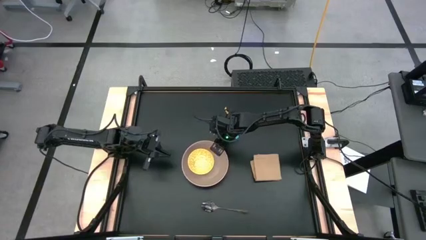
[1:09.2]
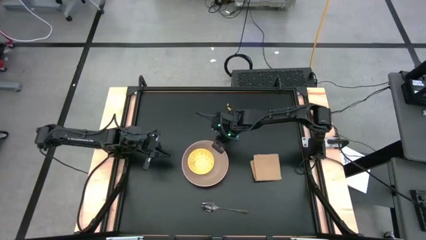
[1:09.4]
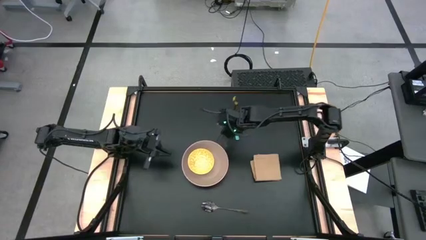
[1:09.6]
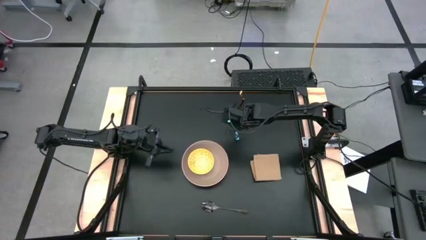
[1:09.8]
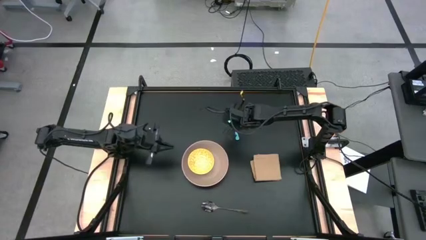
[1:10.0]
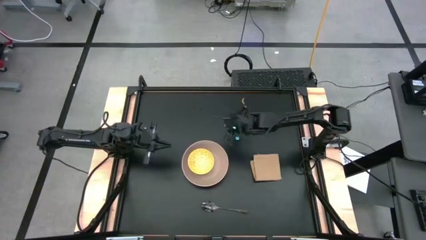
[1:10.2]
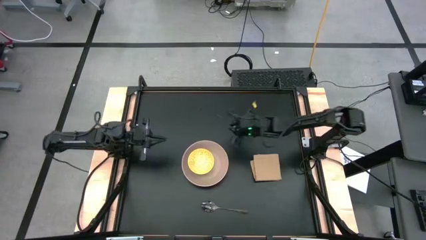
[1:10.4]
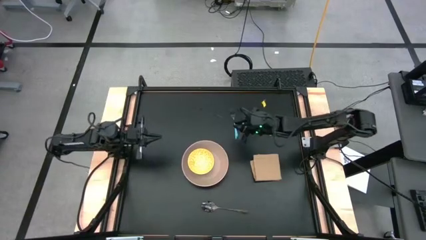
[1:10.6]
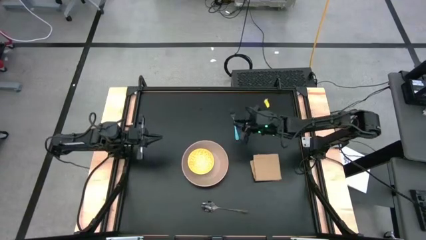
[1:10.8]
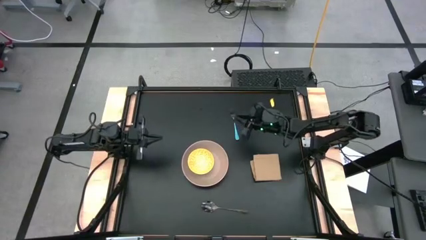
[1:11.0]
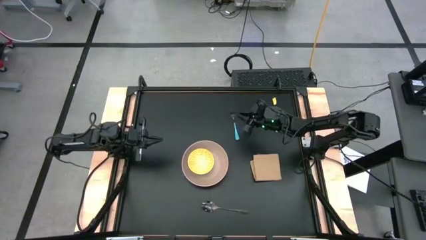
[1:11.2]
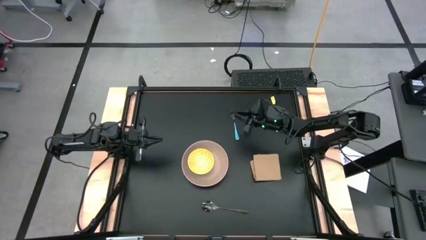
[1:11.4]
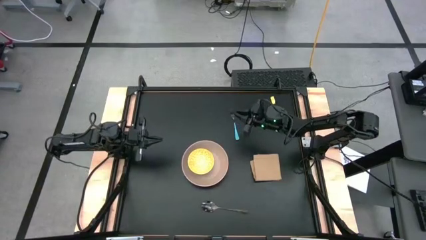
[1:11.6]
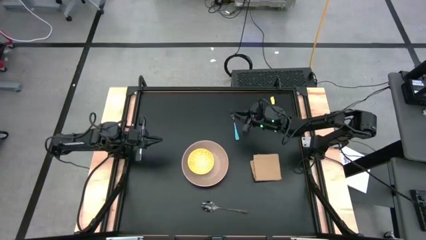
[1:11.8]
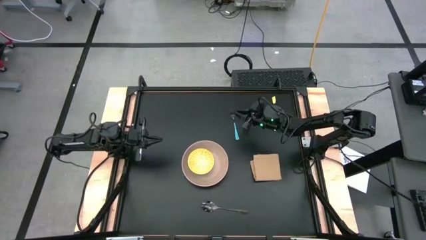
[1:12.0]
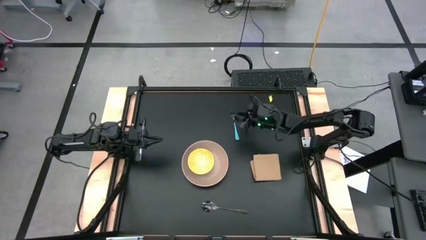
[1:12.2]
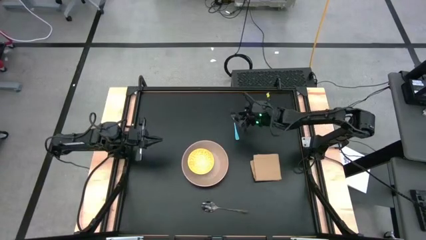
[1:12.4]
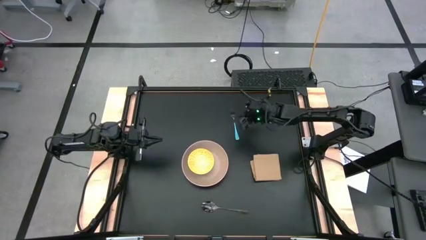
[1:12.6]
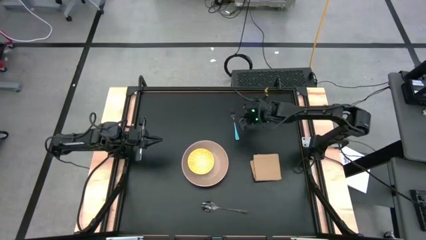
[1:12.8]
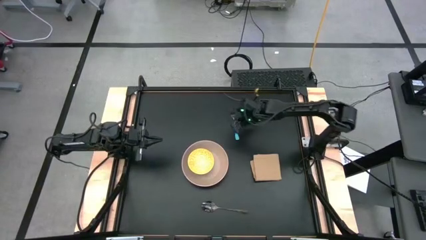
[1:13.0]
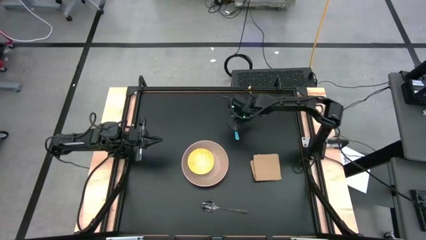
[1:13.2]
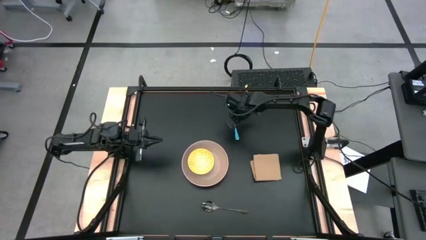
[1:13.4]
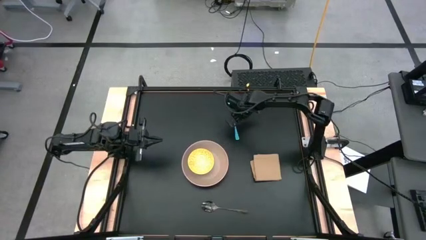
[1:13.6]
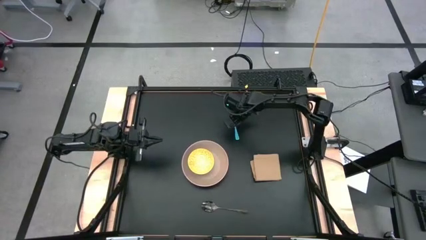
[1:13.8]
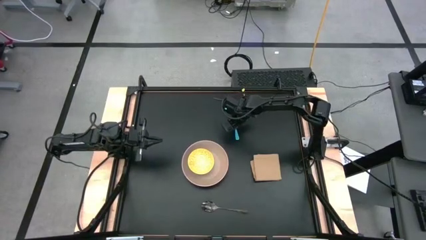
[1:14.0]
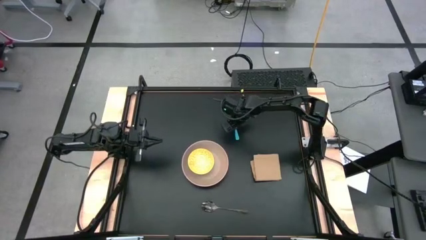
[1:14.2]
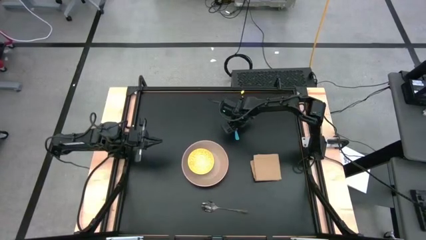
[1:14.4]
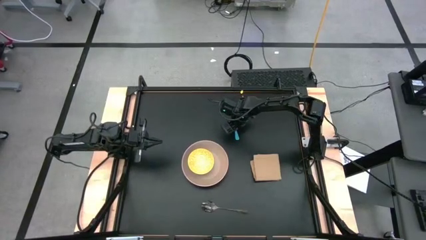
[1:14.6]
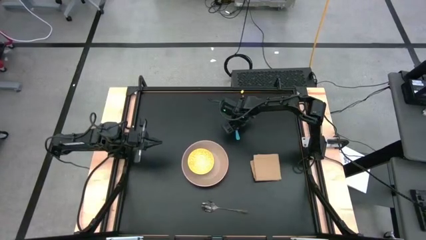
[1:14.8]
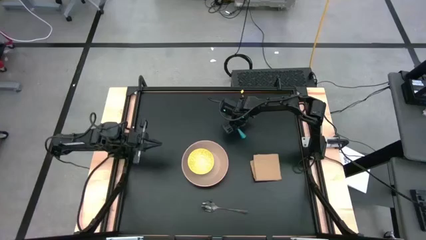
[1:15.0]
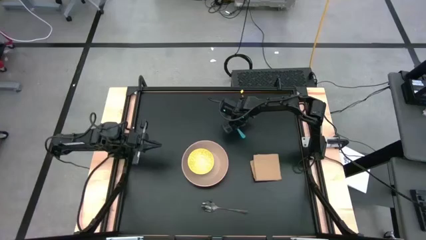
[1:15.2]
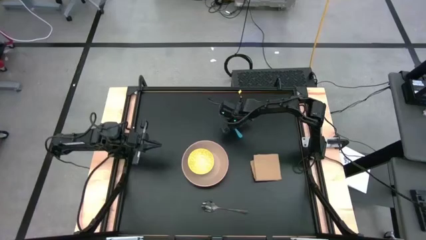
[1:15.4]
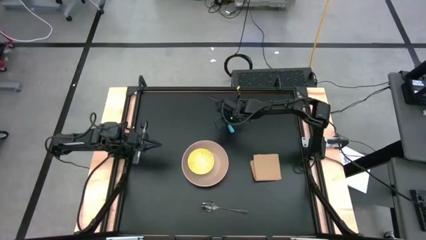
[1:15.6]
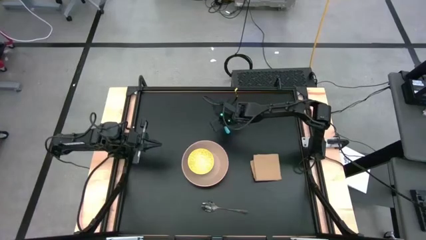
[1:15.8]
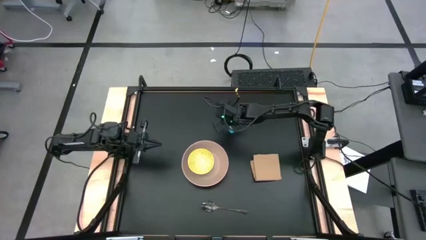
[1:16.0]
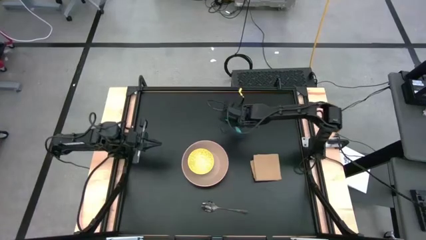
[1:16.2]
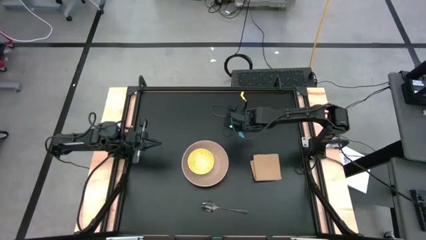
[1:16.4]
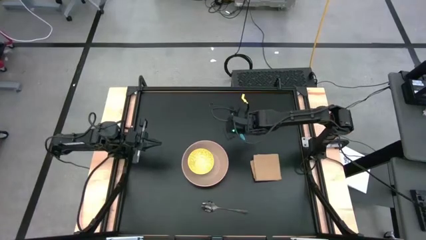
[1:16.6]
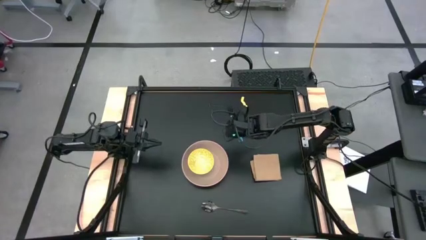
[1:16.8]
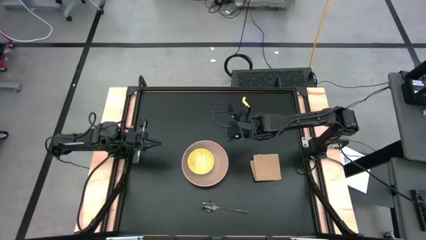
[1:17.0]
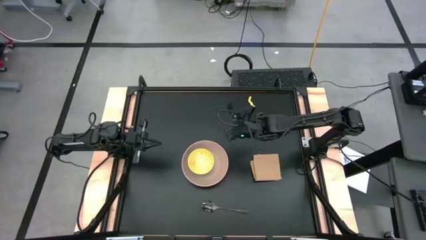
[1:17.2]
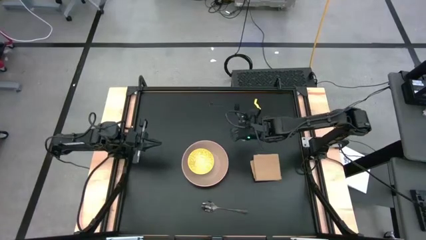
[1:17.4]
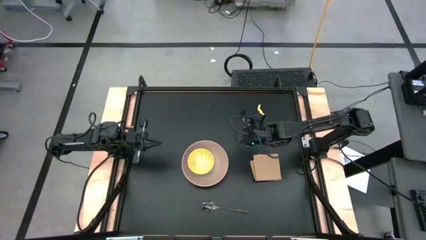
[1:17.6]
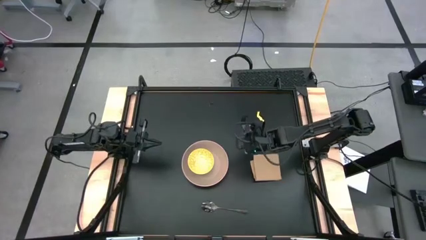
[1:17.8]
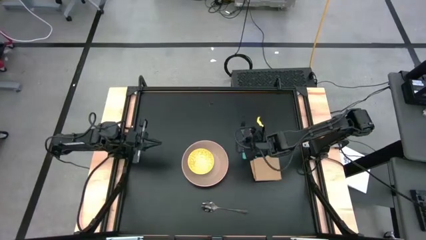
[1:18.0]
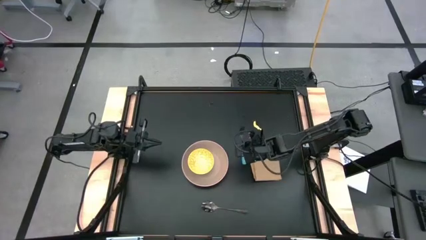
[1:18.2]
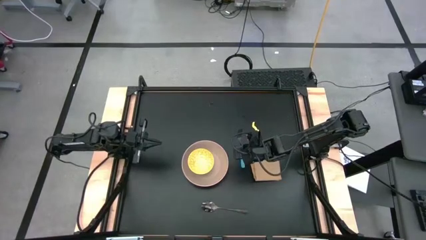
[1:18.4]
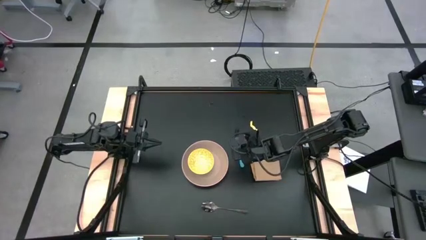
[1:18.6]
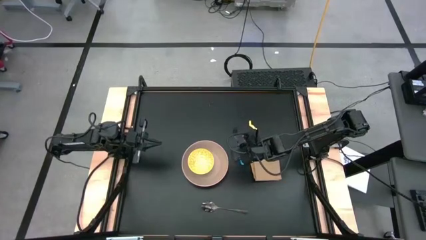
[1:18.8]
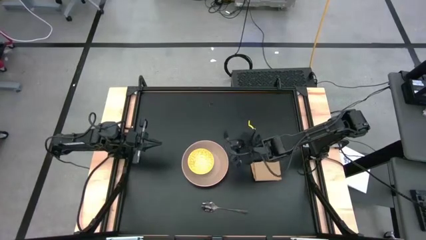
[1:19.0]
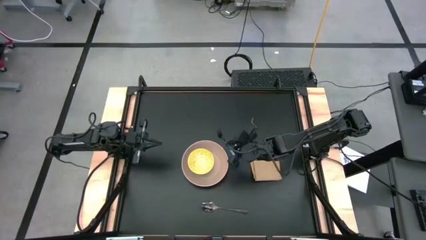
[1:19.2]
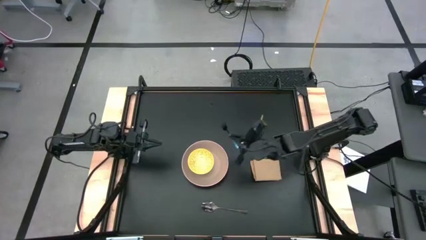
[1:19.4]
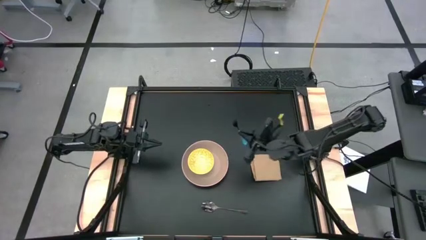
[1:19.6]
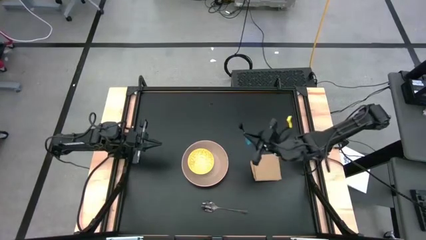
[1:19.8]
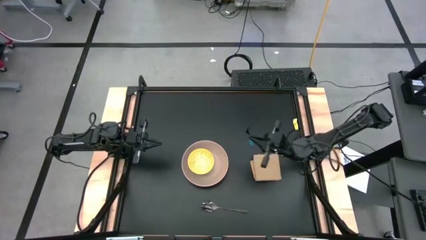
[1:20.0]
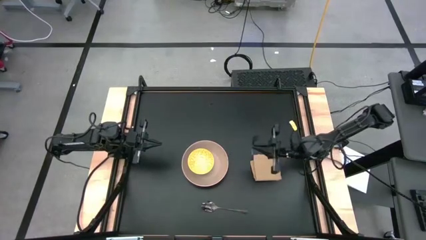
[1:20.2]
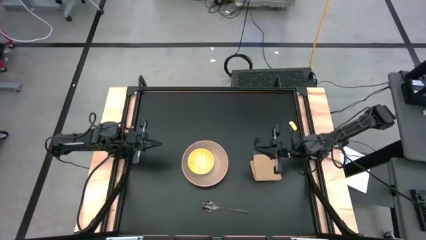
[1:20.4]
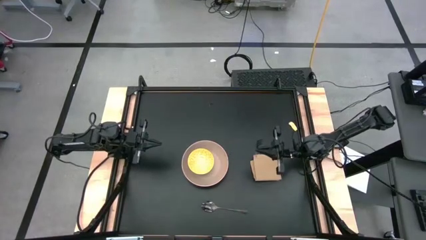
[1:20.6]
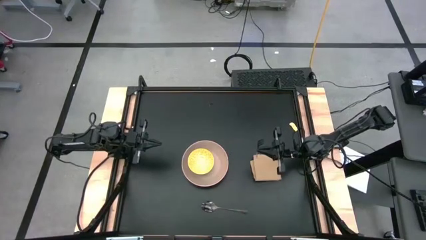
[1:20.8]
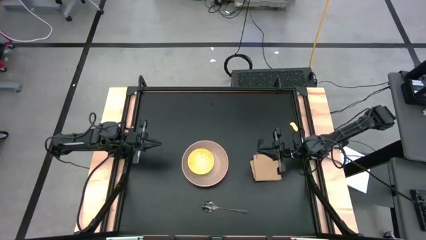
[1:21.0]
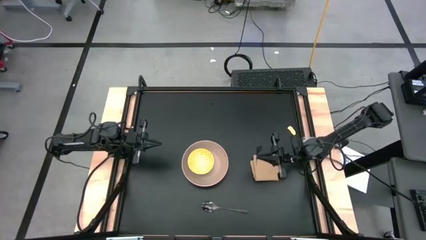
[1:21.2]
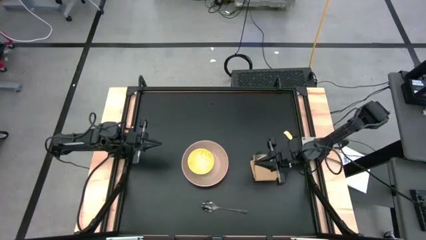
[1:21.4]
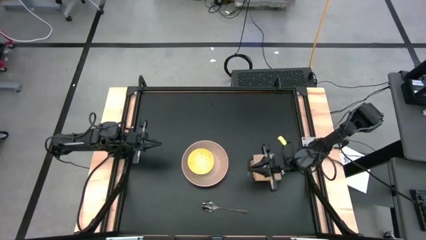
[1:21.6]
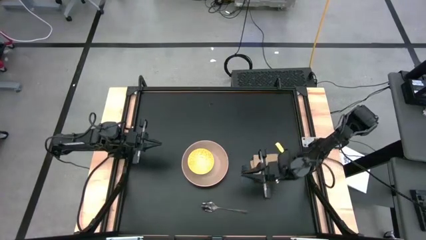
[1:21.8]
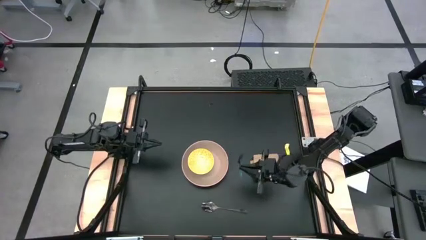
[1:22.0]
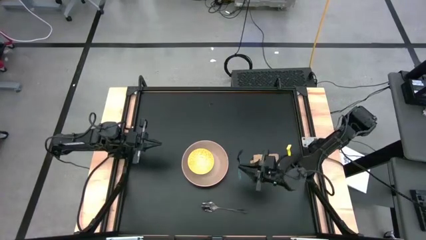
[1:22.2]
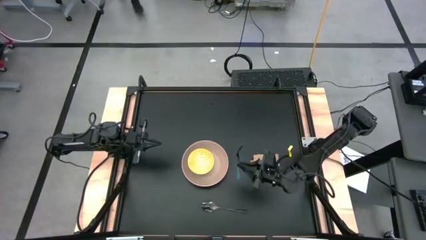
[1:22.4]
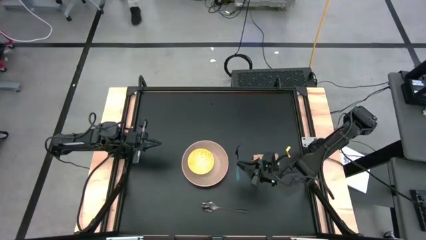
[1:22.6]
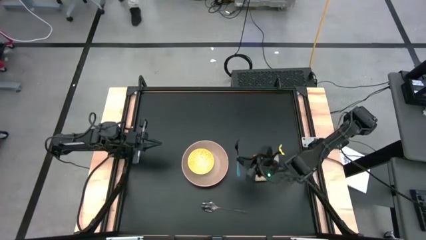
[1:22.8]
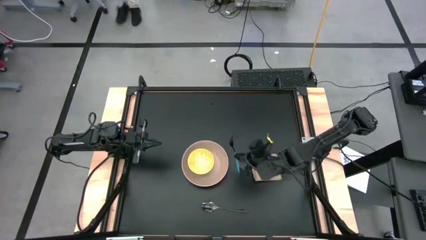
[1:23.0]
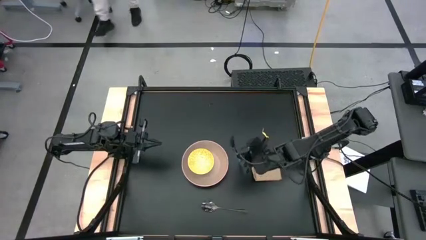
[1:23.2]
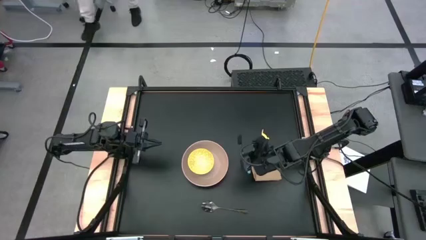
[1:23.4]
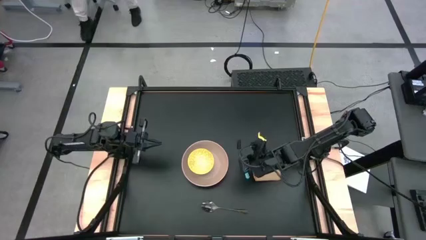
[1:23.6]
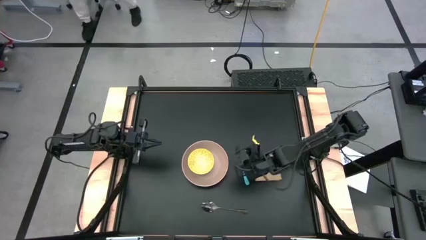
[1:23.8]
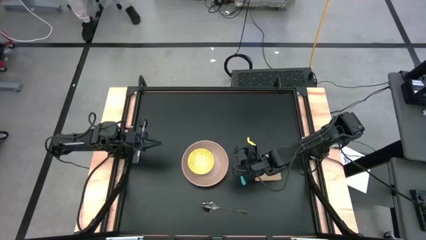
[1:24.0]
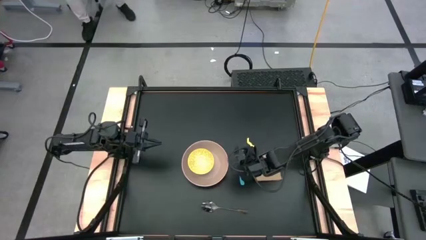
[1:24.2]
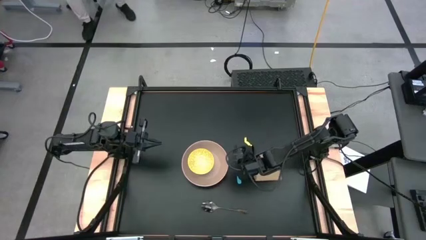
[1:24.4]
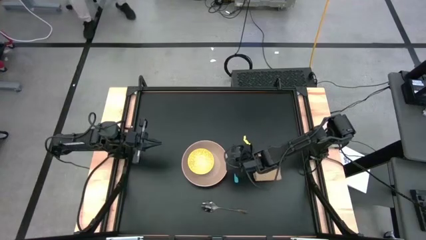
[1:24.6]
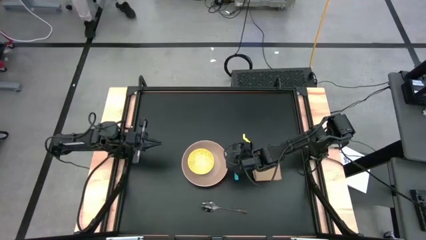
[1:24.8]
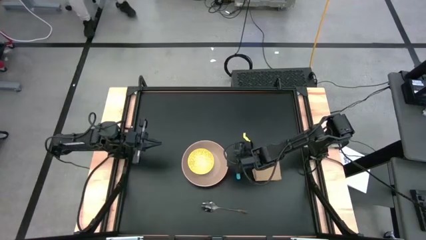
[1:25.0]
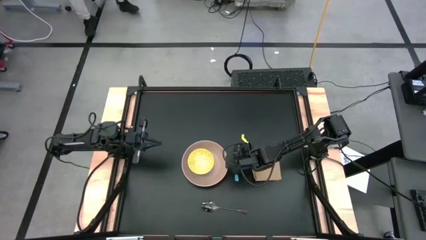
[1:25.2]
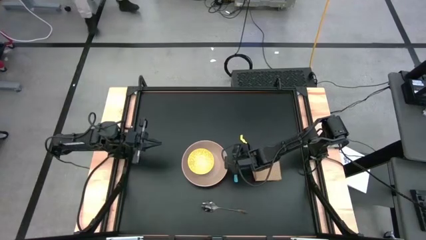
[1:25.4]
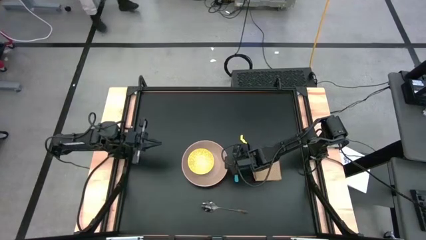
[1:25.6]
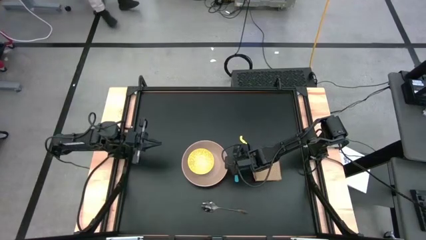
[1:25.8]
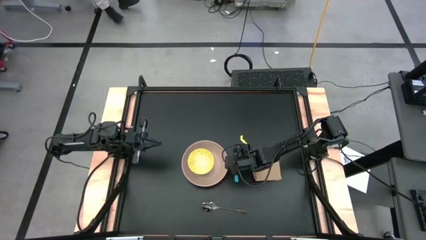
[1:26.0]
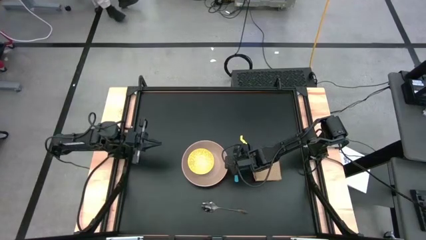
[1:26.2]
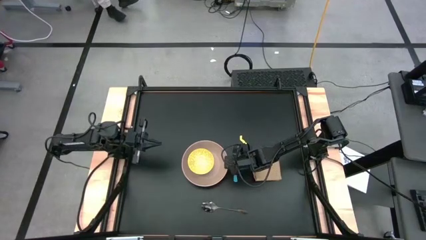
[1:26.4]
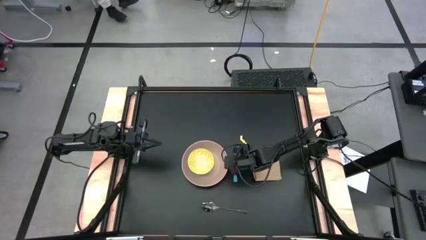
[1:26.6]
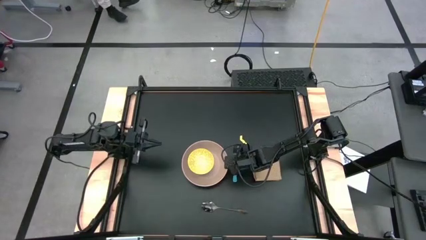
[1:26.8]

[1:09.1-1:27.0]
Task: Set table place
Put the blue fork to the right of the brown plate
